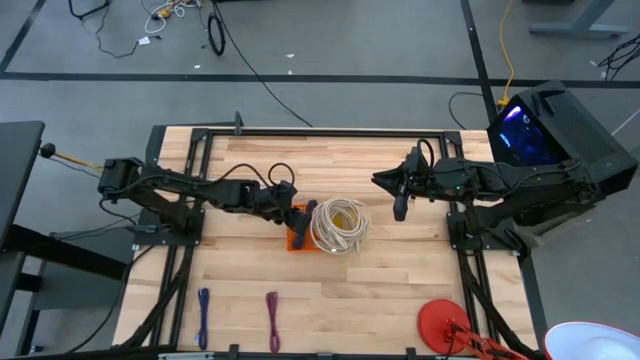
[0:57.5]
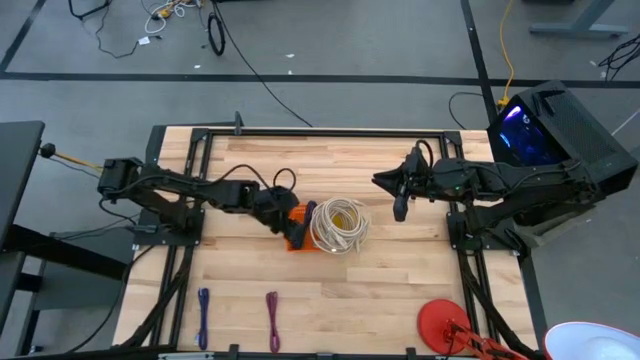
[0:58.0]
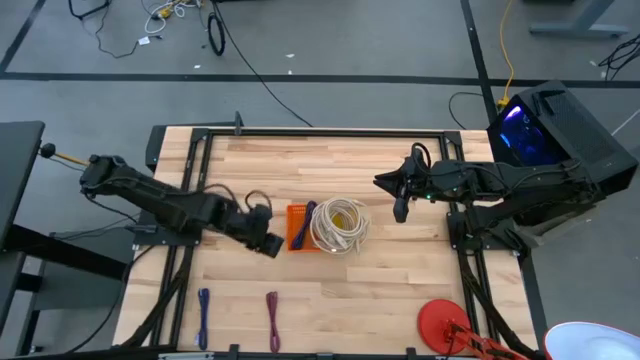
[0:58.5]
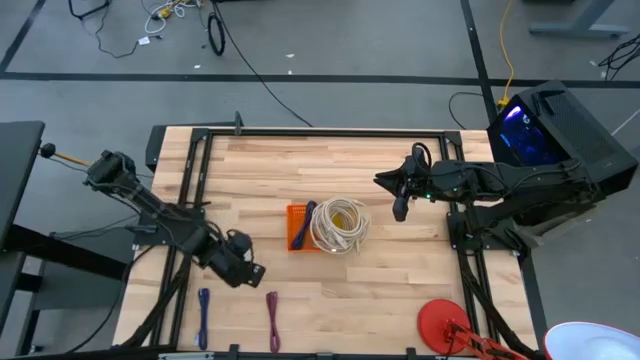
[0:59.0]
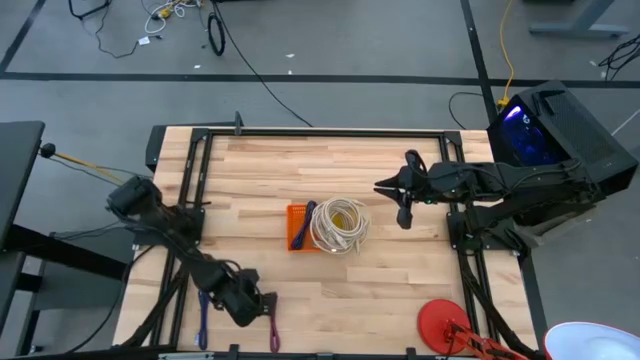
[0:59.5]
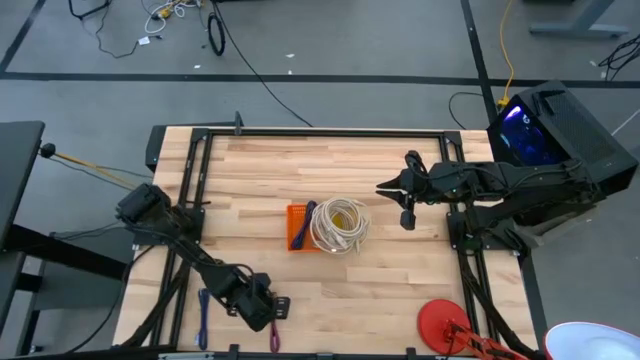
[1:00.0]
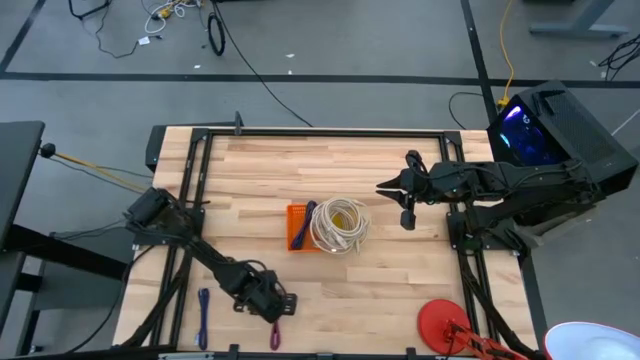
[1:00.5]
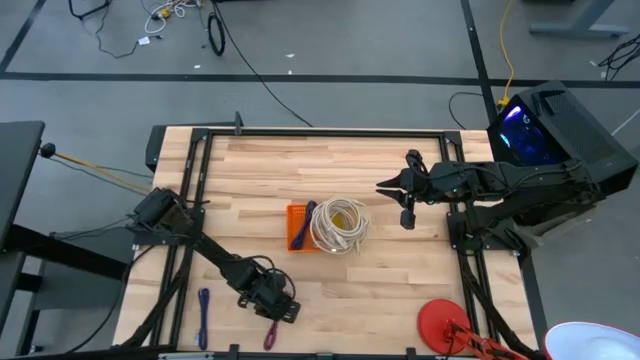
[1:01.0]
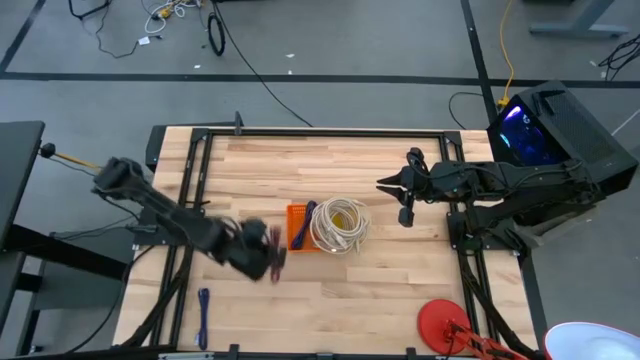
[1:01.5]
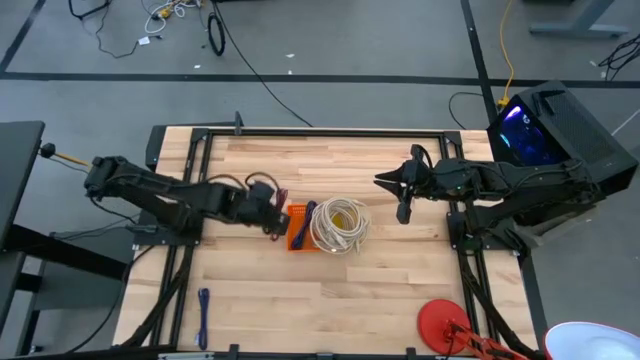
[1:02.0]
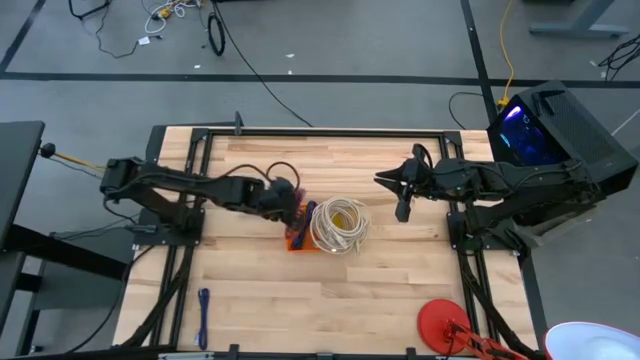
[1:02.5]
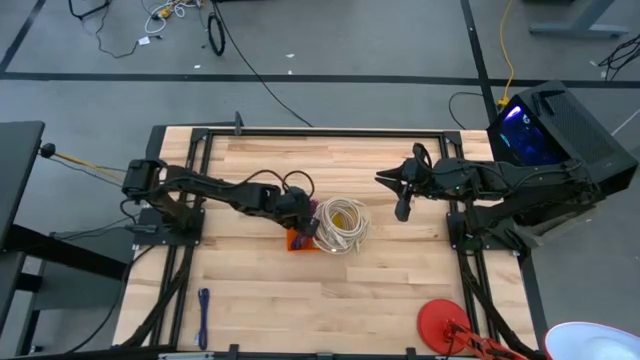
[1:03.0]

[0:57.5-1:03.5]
Task: Pick & Place USB Port
Put the pink charger cable into the orange bin

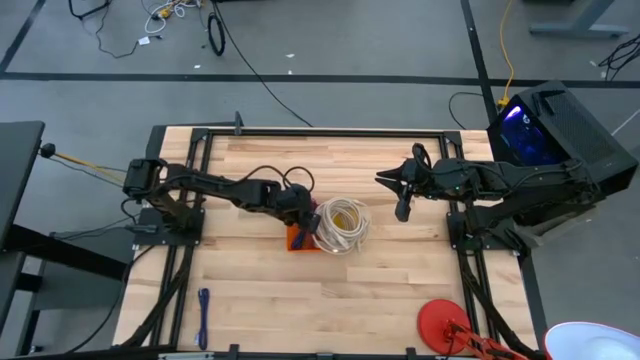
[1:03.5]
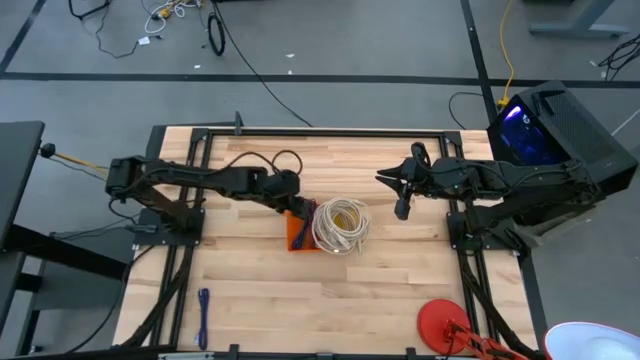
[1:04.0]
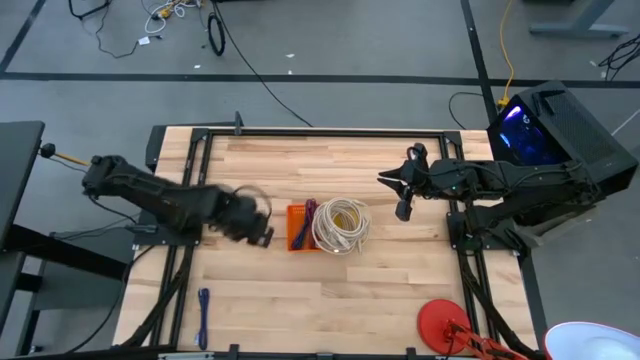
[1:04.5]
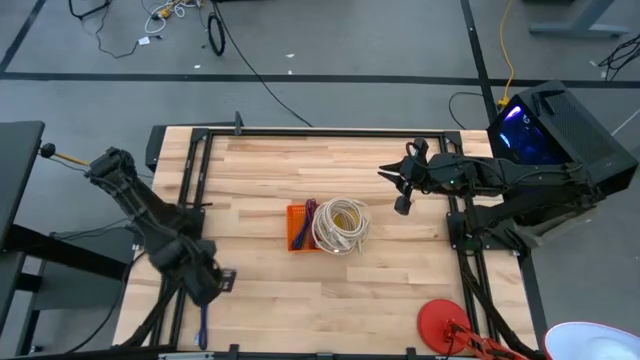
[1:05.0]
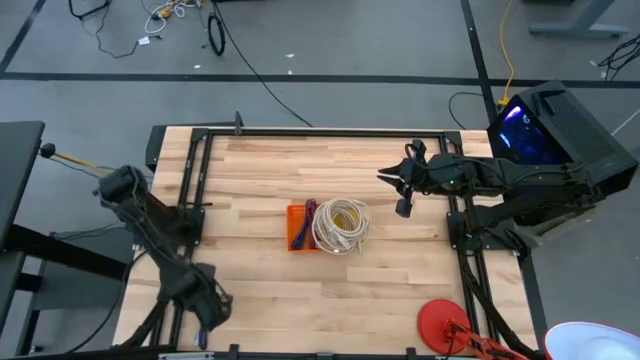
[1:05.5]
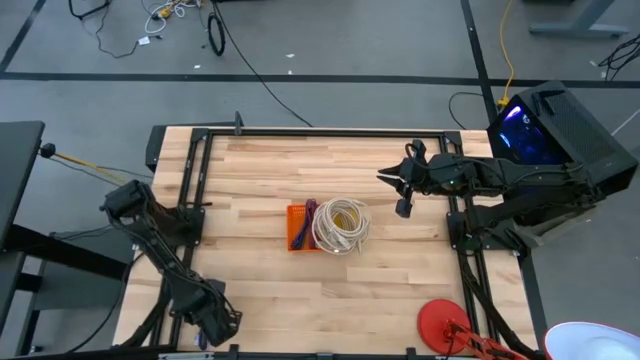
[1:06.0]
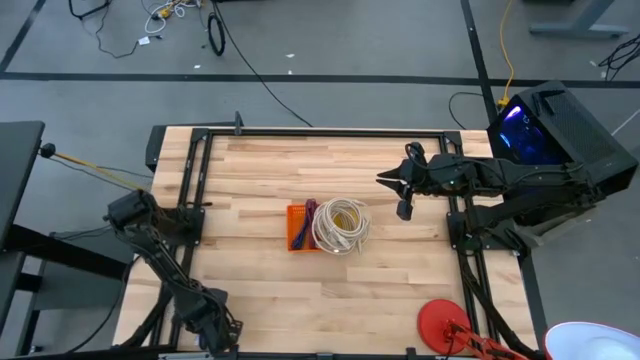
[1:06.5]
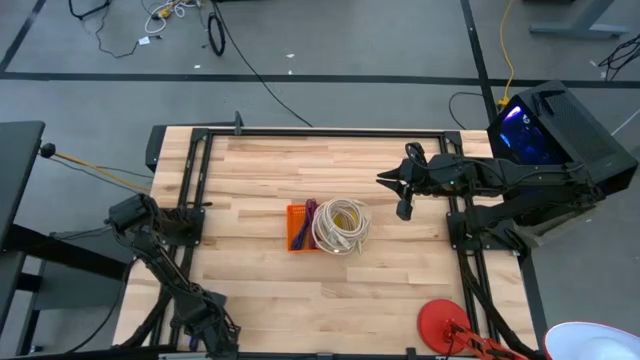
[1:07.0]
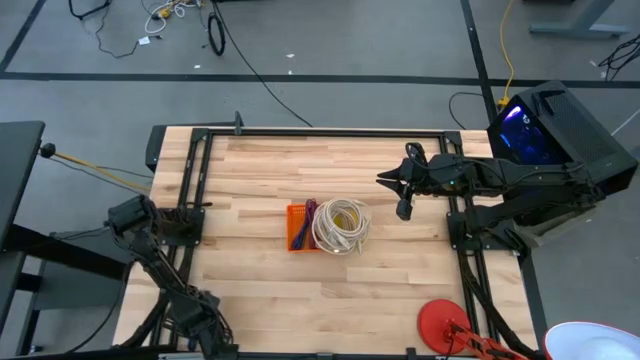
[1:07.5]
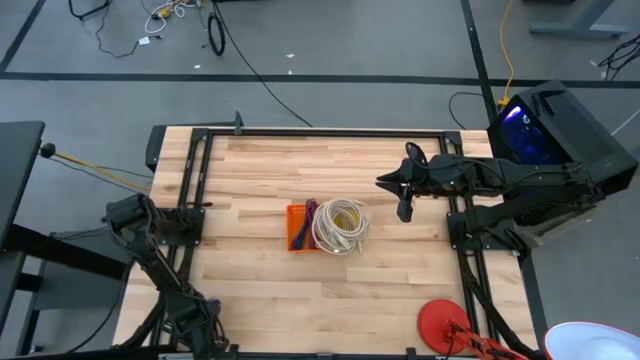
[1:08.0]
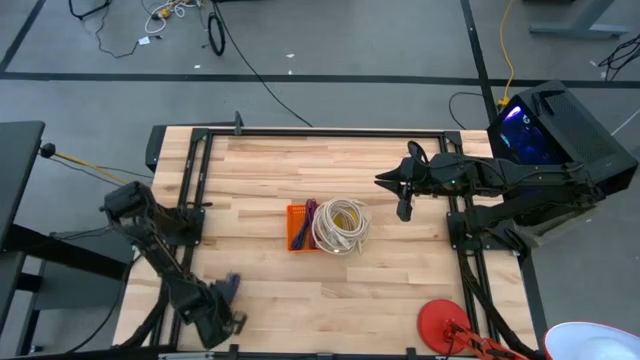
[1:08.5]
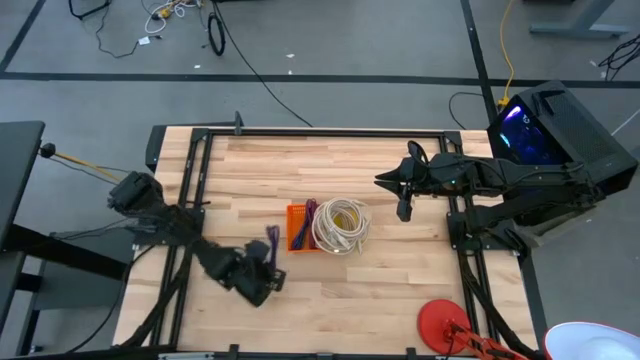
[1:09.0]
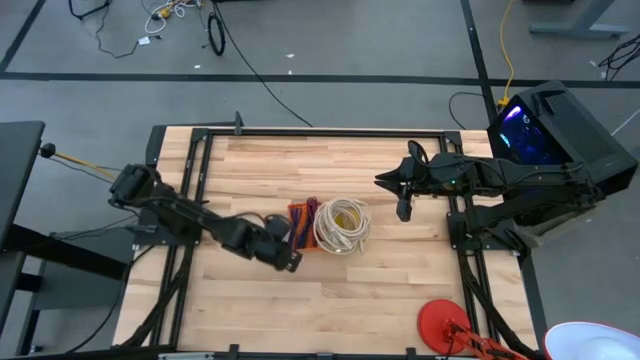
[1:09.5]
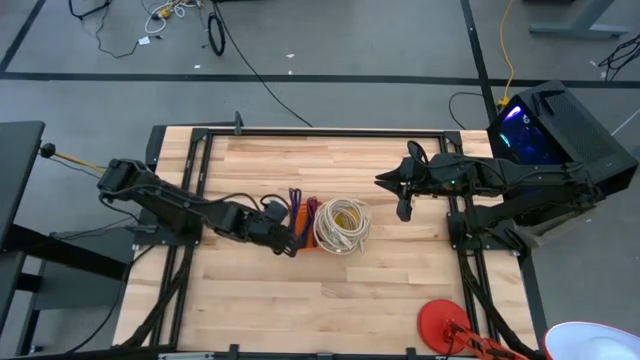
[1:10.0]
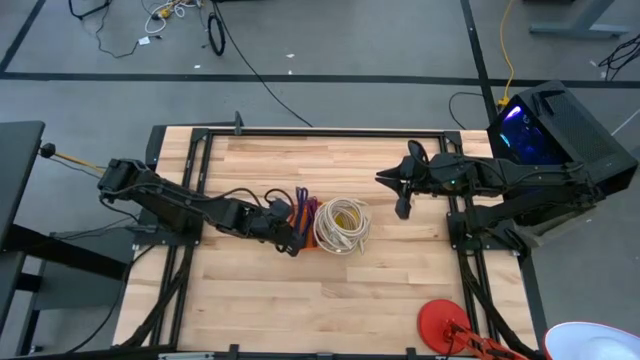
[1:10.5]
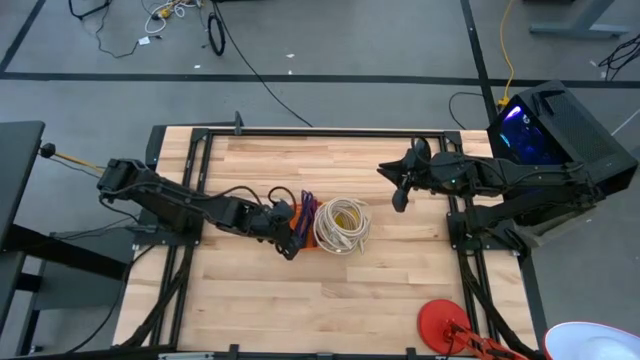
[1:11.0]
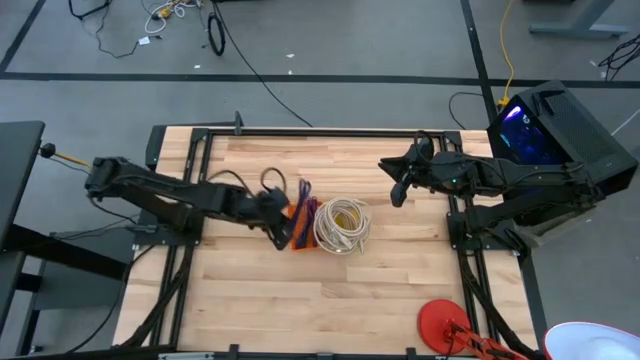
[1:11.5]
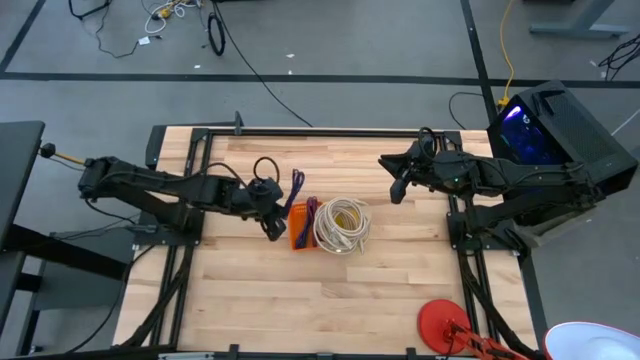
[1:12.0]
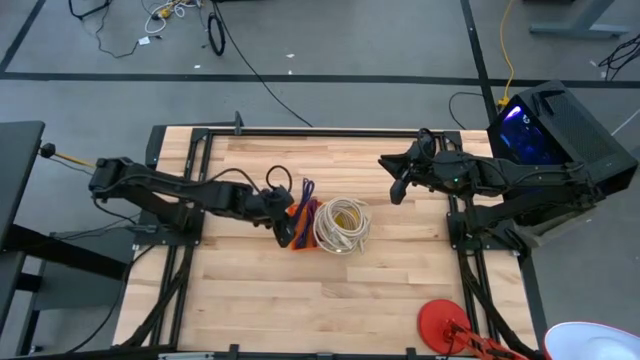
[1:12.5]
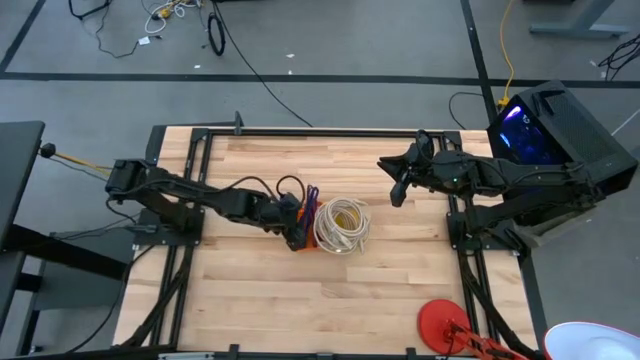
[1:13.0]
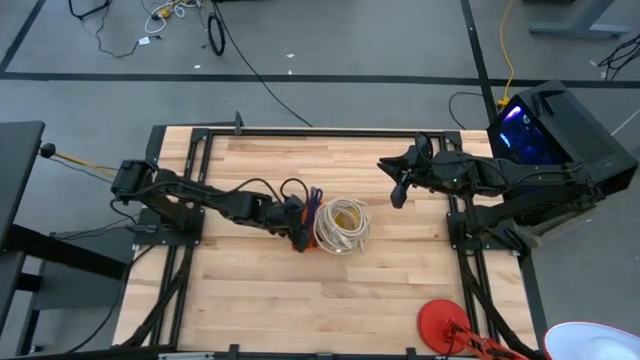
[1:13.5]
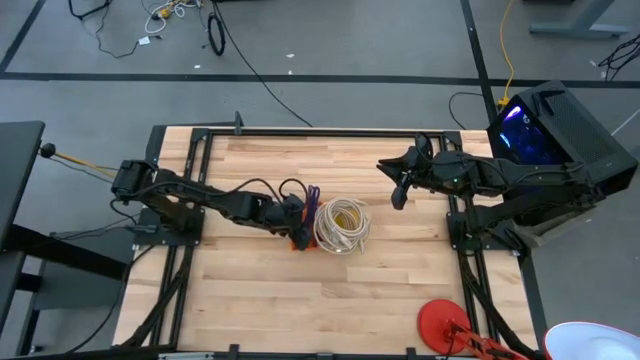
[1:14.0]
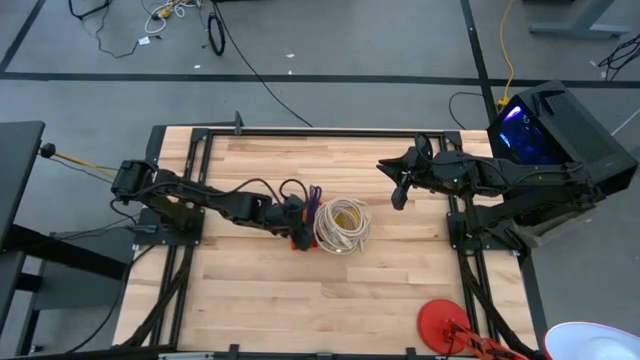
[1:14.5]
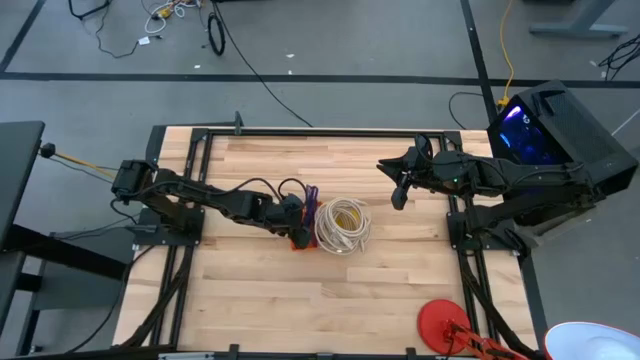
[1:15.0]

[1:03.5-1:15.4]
Put the blue charger cable into the orange bin

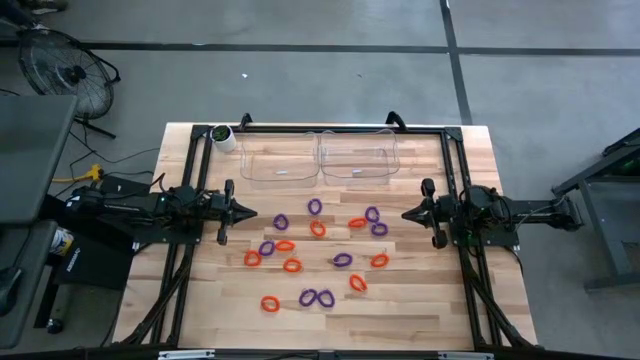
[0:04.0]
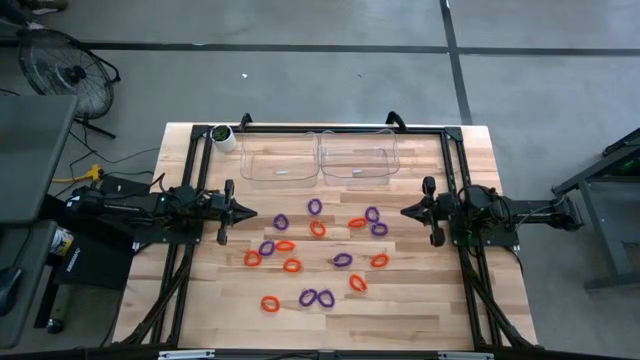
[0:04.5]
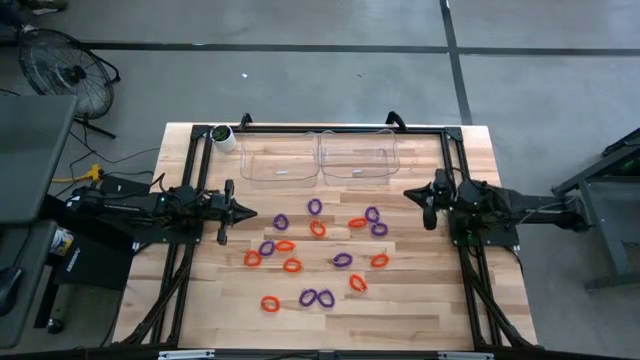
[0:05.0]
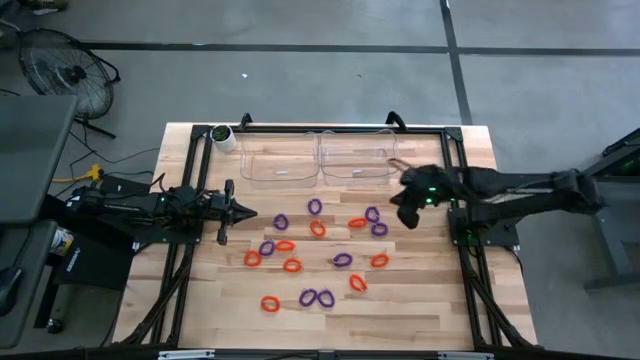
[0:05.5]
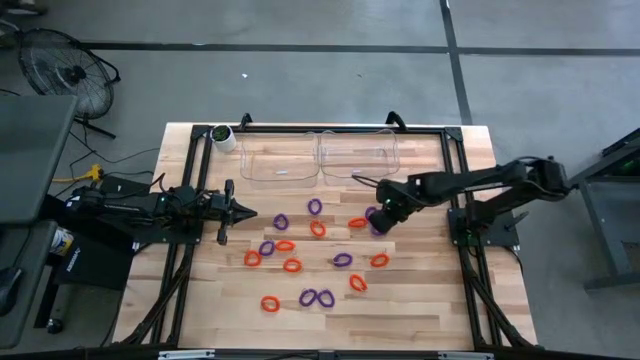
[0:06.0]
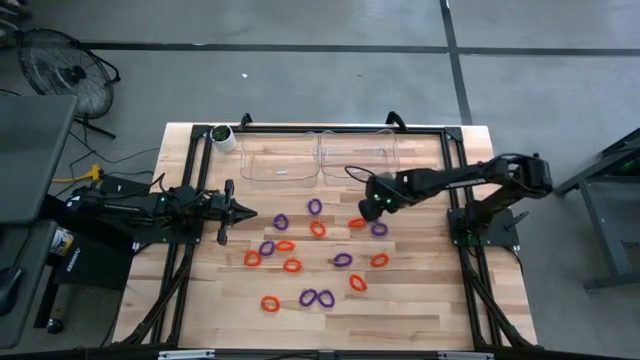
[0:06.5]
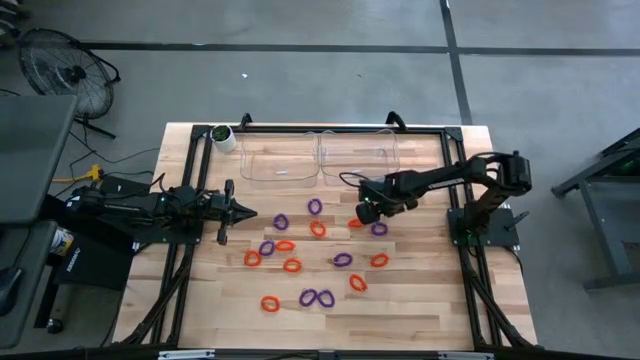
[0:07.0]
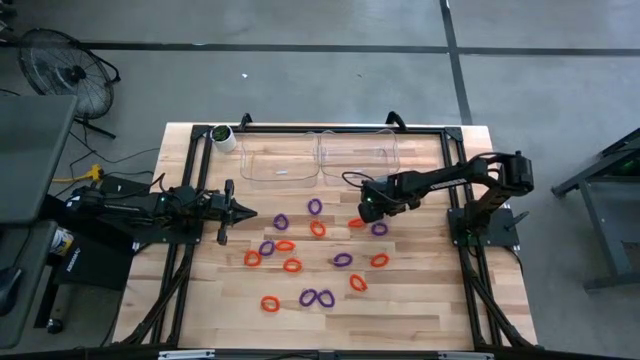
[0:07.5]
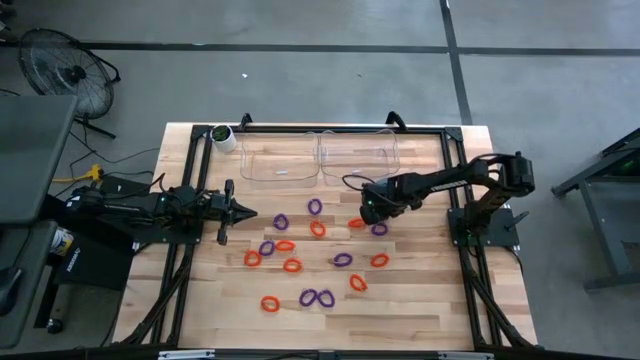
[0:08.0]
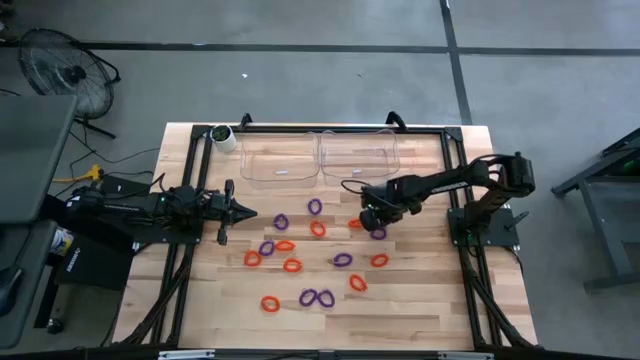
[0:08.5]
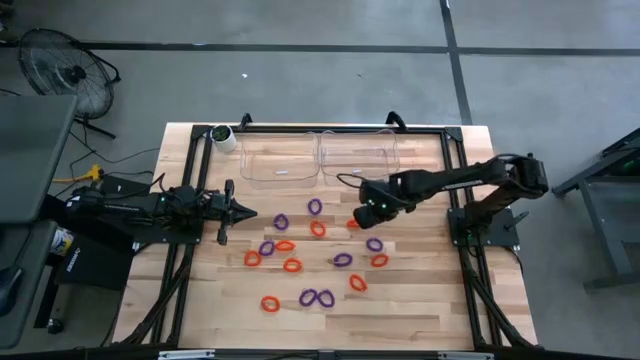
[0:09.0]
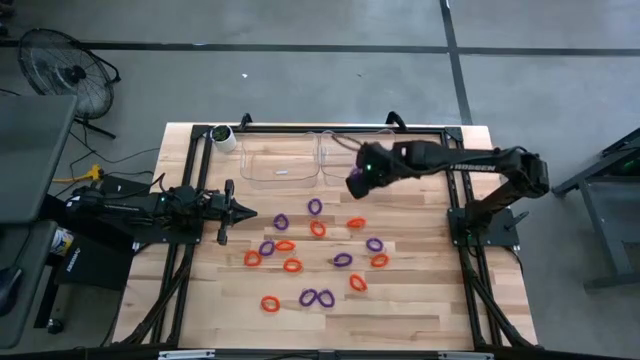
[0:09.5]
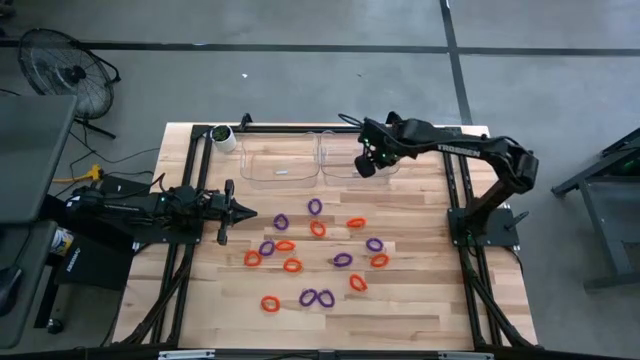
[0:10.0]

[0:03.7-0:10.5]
Task: Sort spring keychains
Put the violet spring keychain into the right bin
